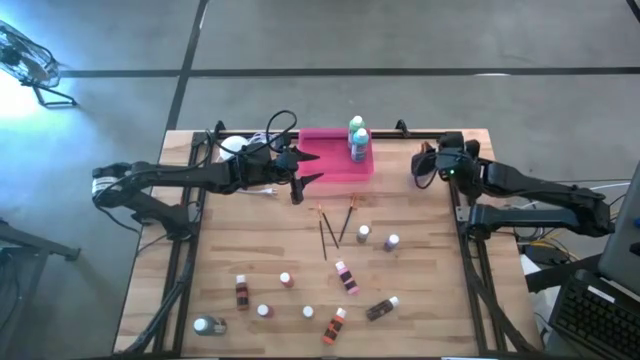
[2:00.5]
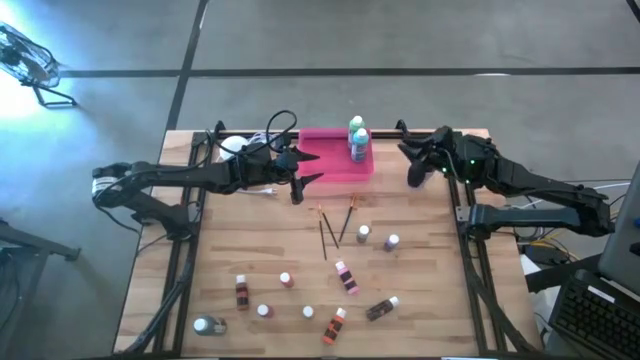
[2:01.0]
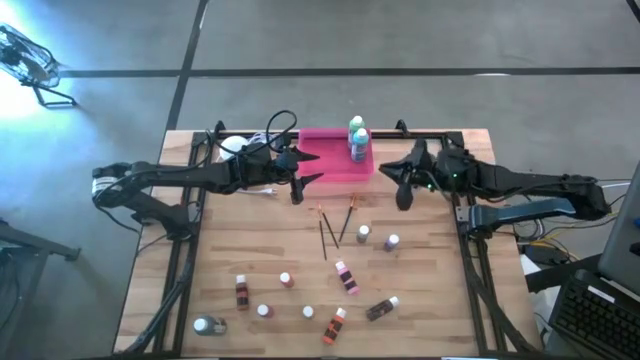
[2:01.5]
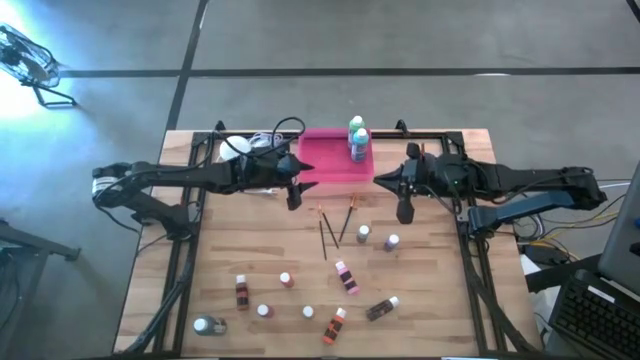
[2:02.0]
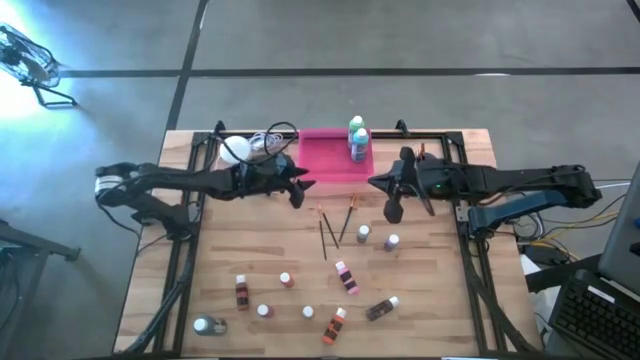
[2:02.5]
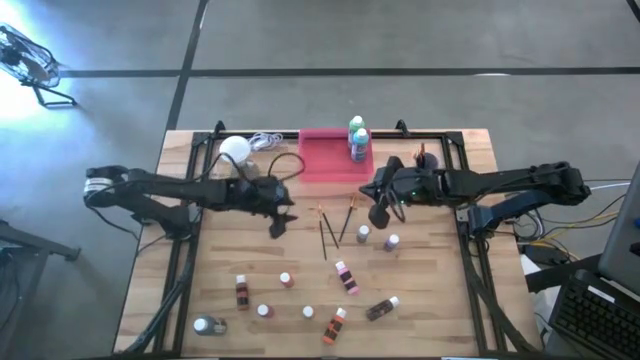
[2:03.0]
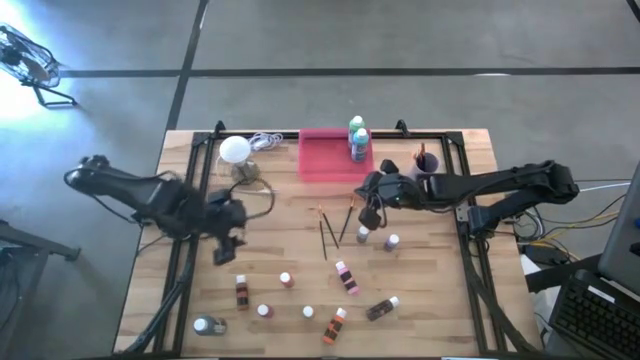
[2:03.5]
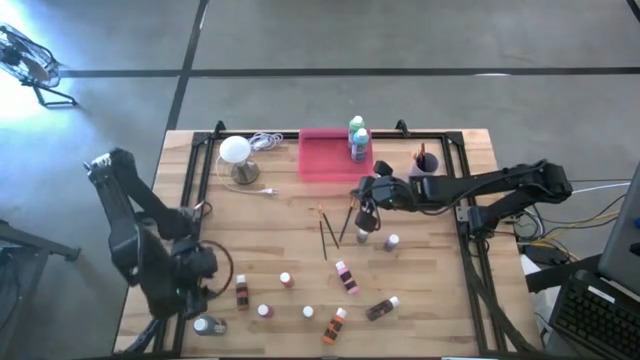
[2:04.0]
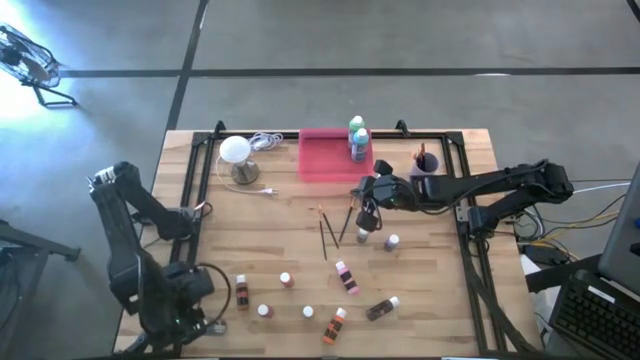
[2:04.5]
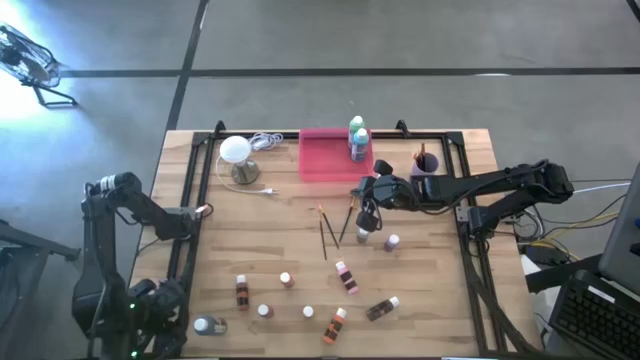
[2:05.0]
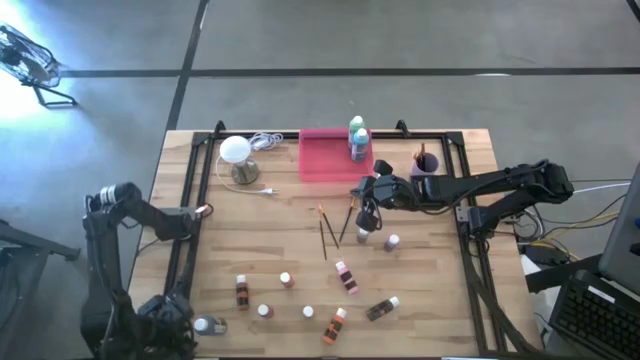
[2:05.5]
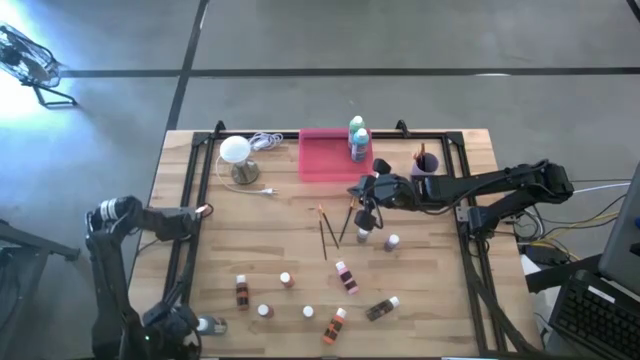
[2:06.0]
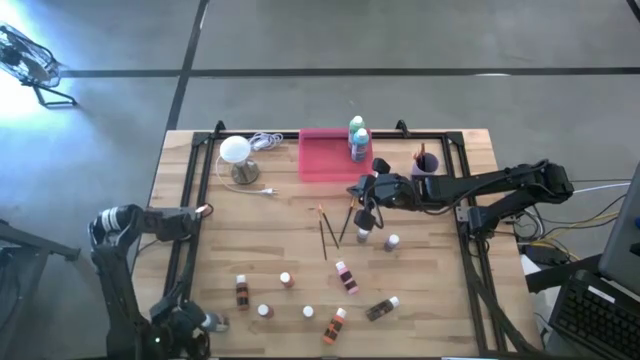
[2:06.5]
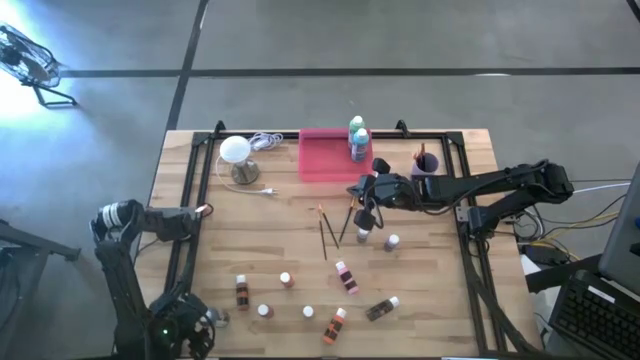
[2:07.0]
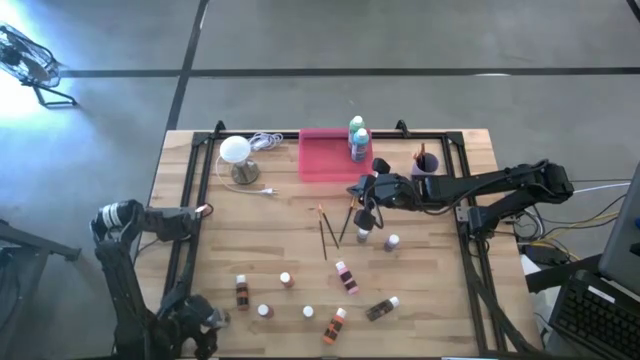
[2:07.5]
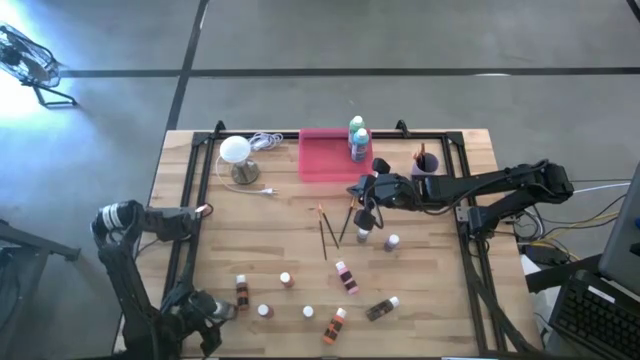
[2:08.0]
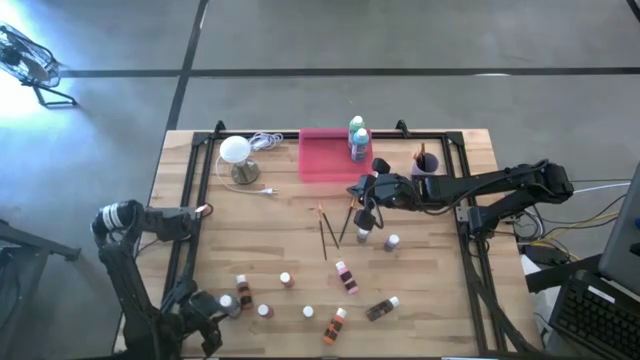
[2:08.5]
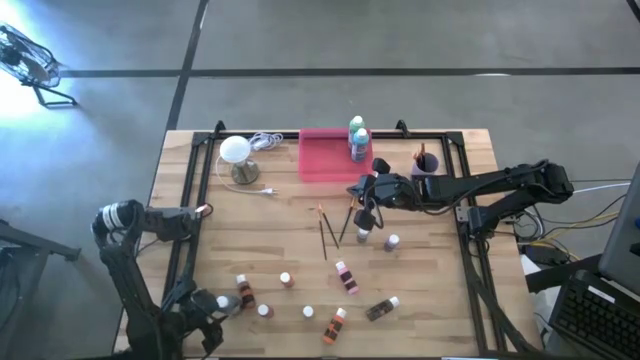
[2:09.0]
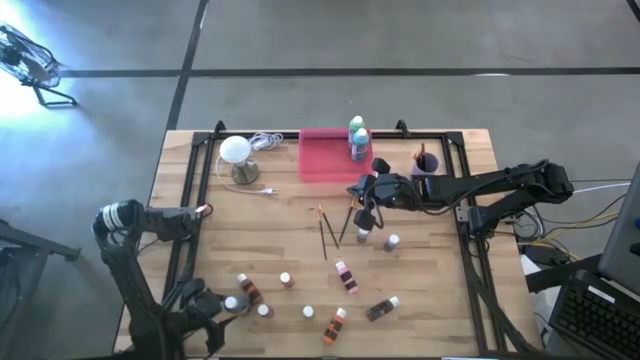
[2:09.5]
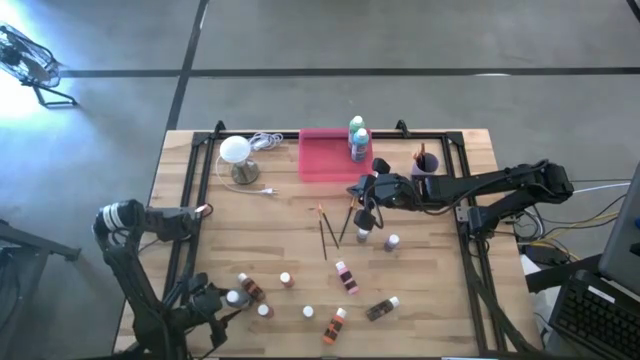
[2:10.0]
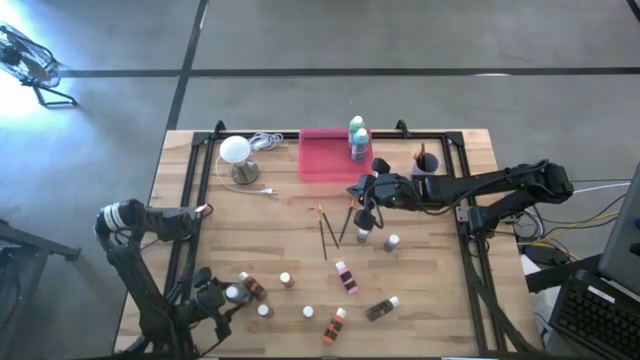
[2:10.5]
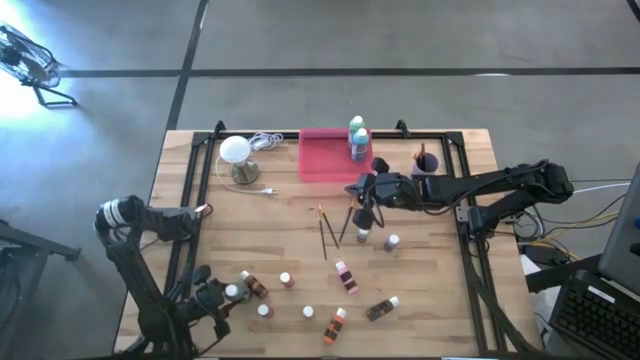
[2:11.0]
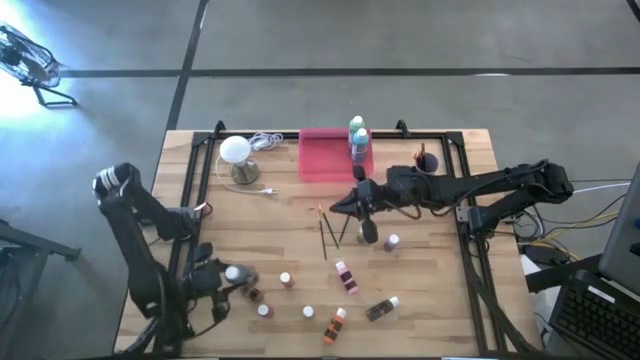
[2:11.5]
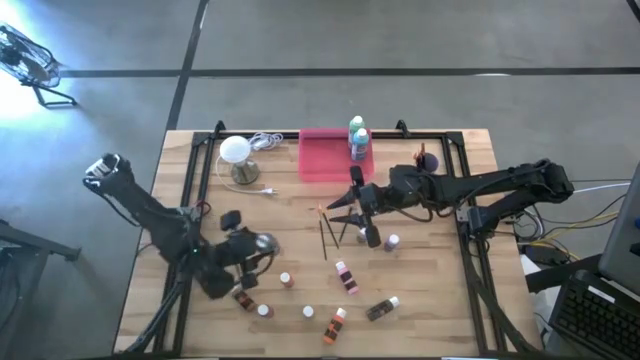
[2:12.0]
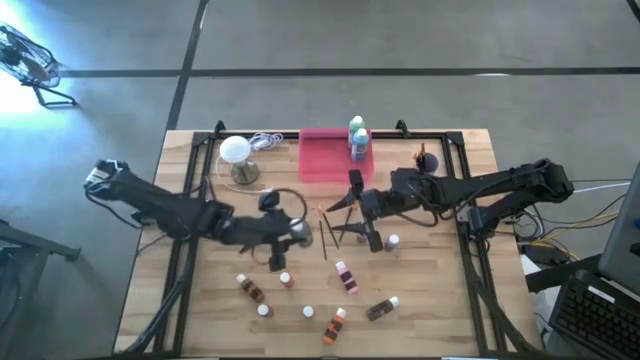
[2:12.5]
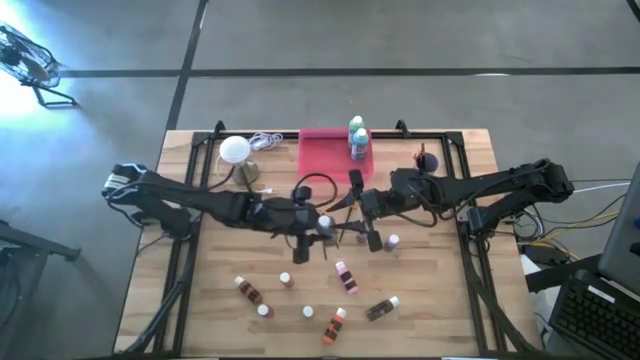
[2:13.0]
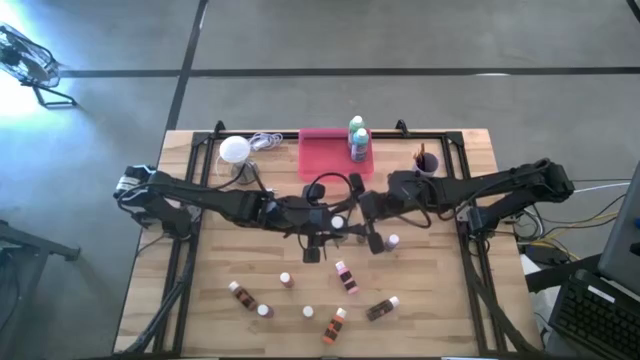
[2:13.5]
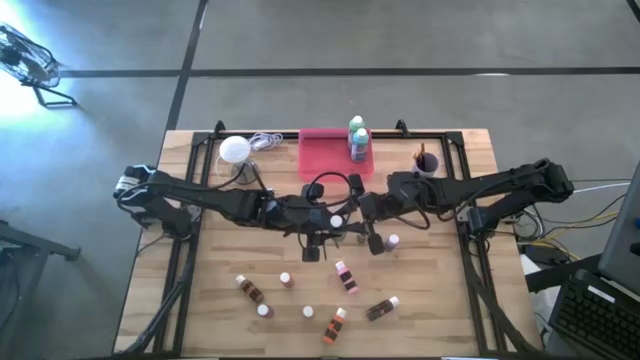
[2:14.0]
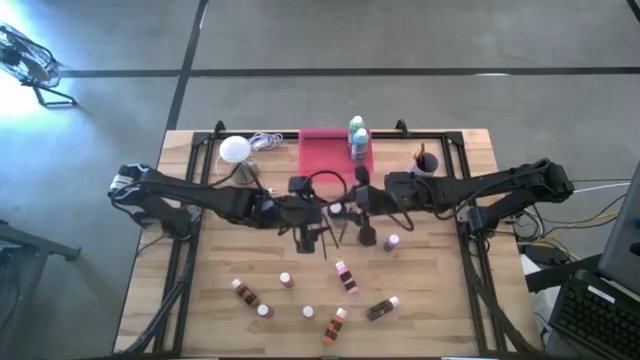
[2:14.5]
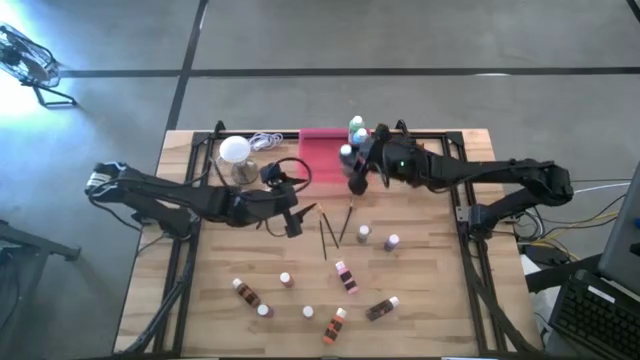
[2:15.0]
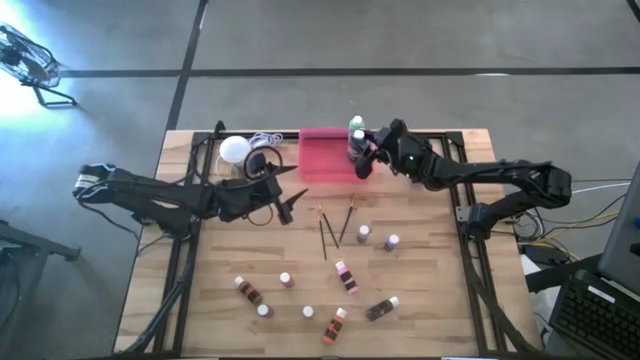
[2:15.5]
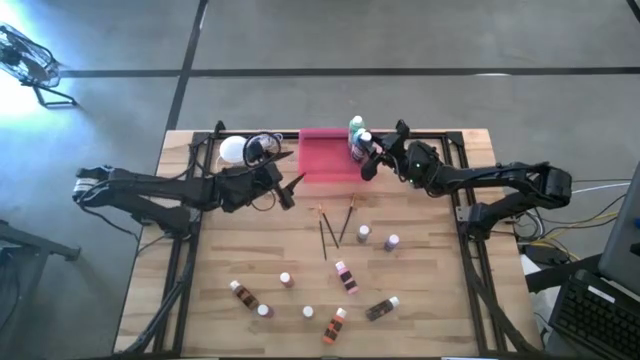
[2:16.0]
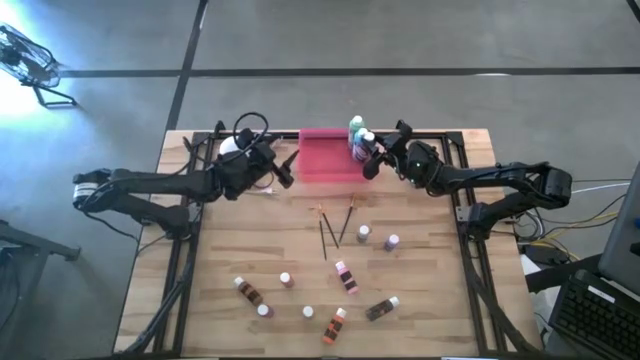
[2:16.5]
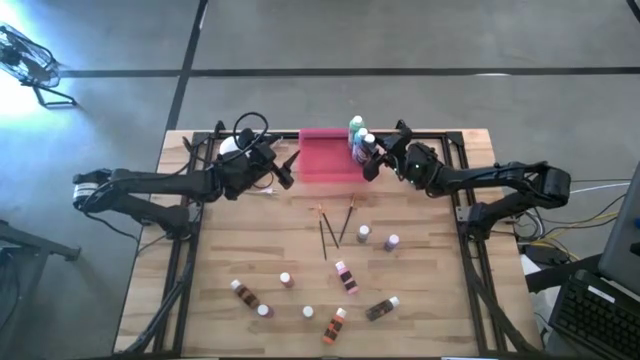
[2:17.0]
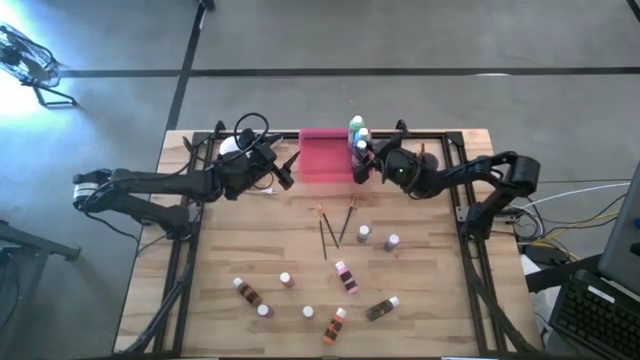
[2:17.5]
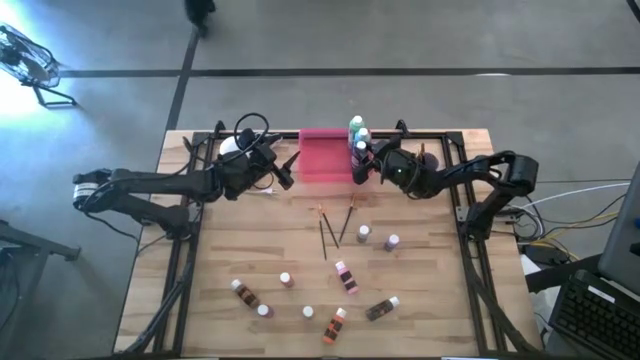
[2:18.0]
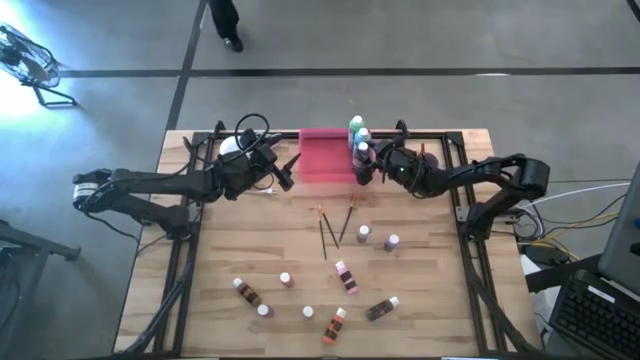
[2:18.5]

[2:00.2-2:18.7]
Task: Pick & Place Paint Supplies
Put the black paint bottle into the pink bin

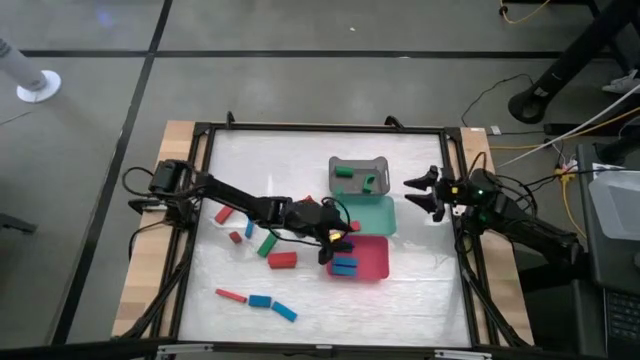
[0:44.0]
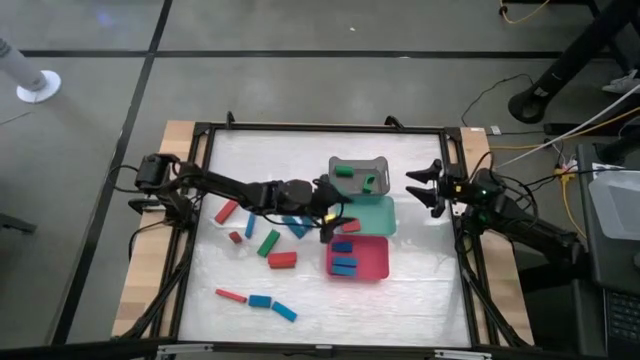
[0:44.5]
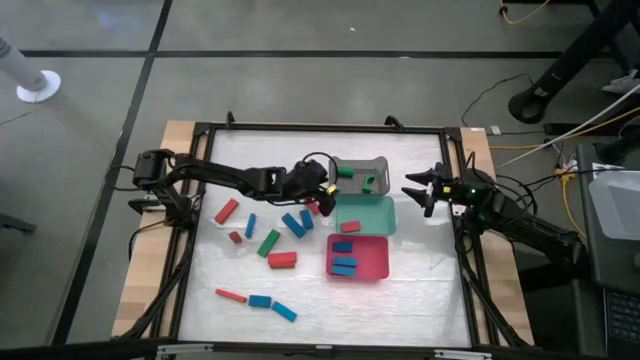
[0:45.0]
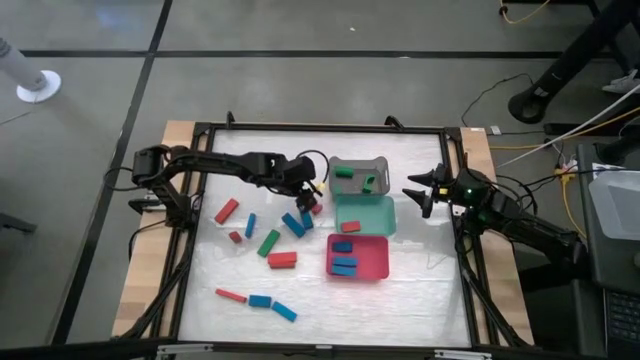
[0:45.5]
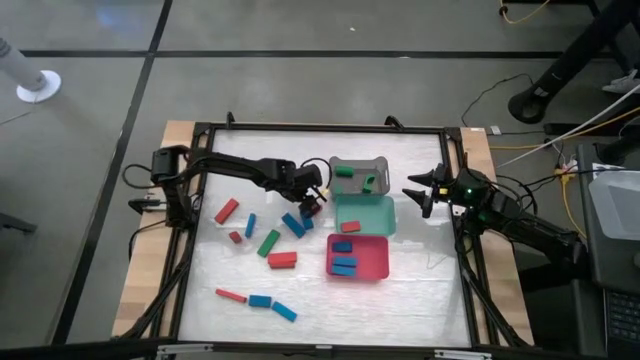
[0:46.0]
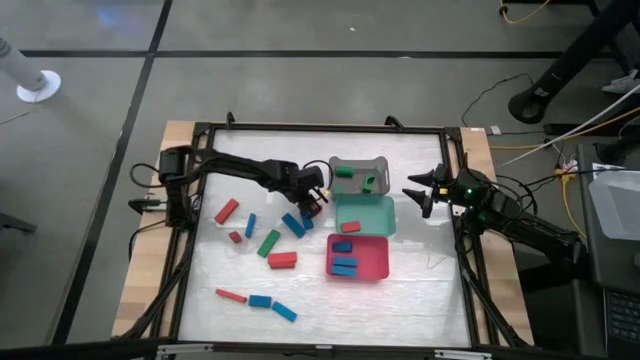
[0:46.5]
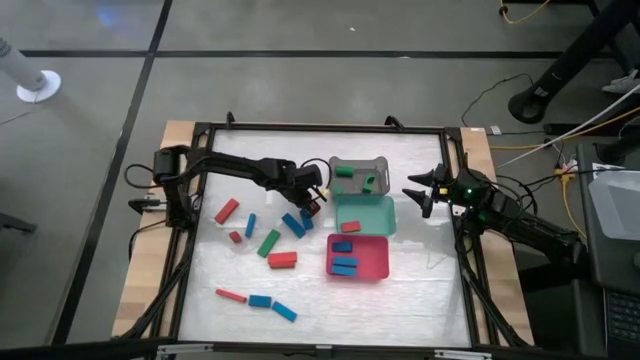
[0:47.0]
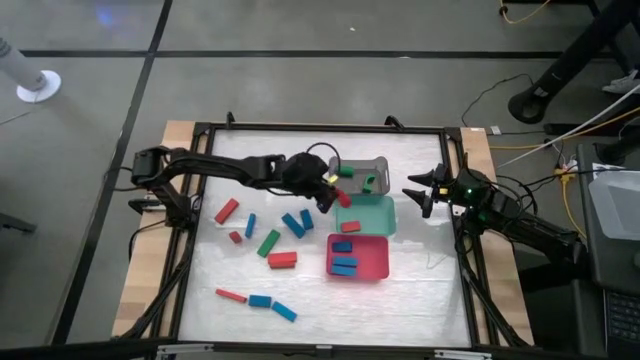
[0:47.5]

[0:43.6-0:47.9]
Task: Sort blocks
Put the red block into the green bin
